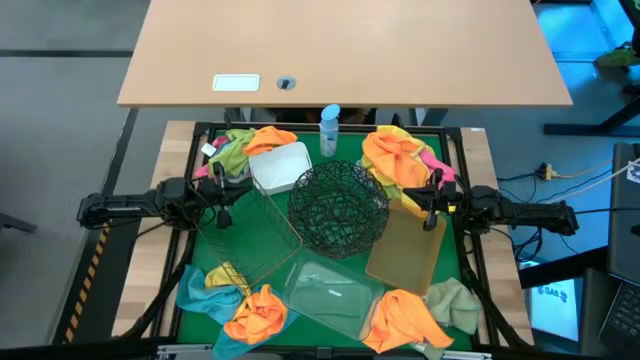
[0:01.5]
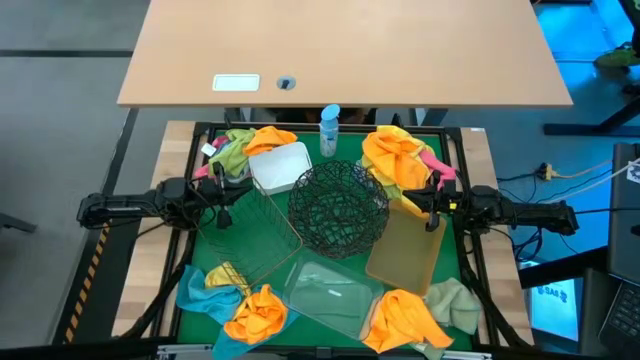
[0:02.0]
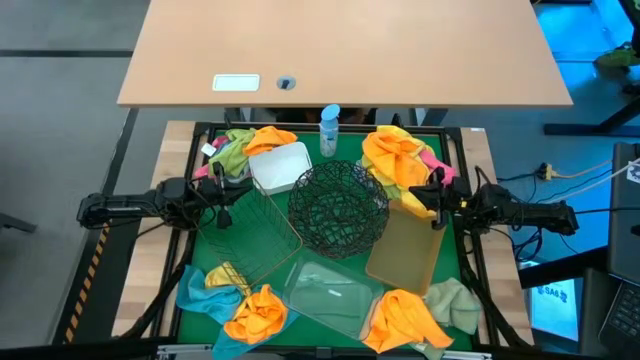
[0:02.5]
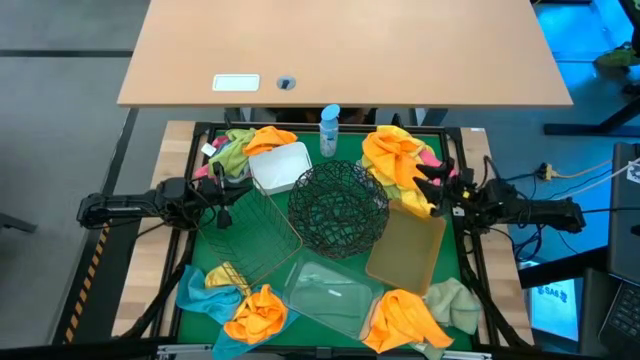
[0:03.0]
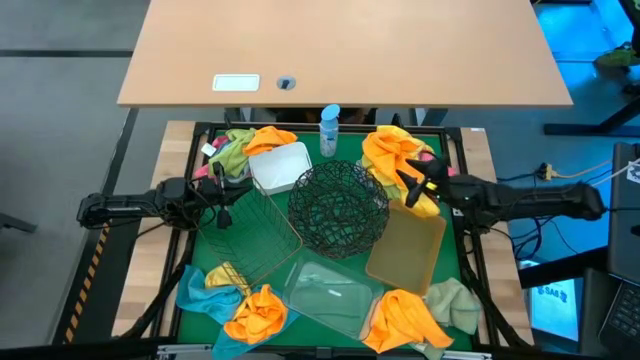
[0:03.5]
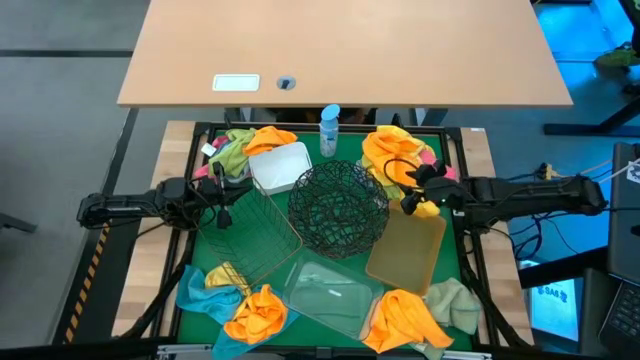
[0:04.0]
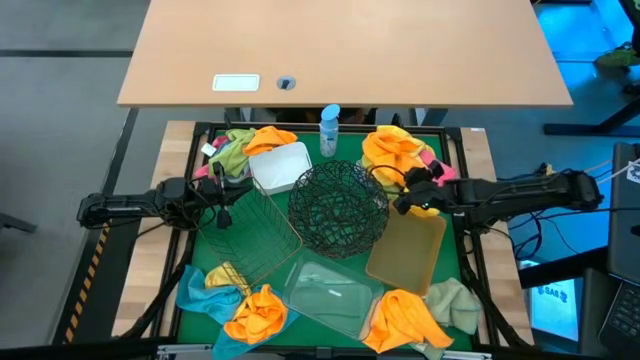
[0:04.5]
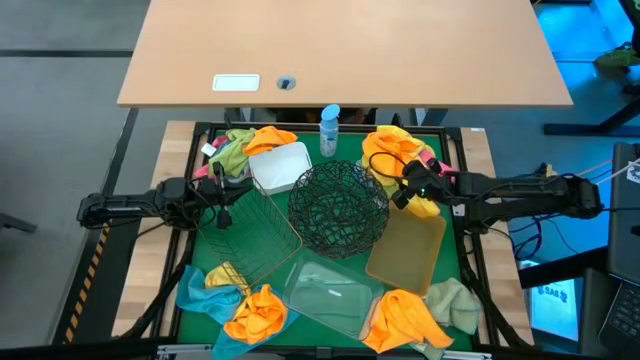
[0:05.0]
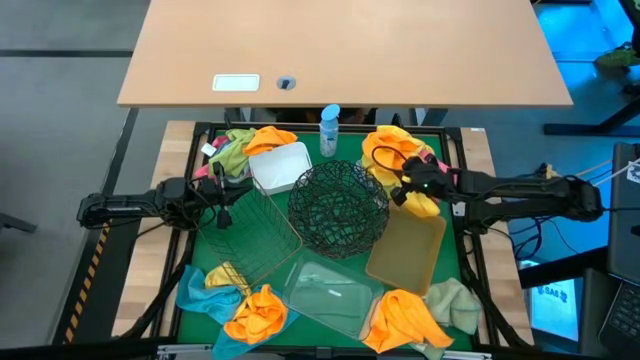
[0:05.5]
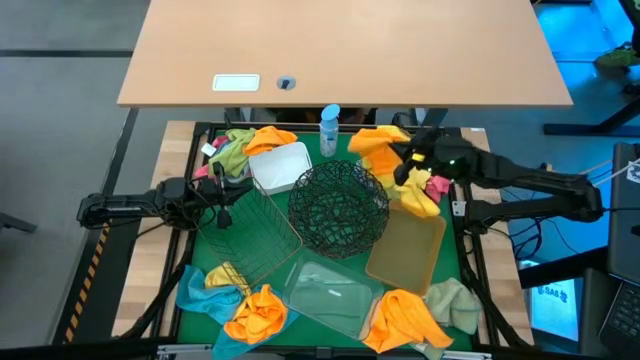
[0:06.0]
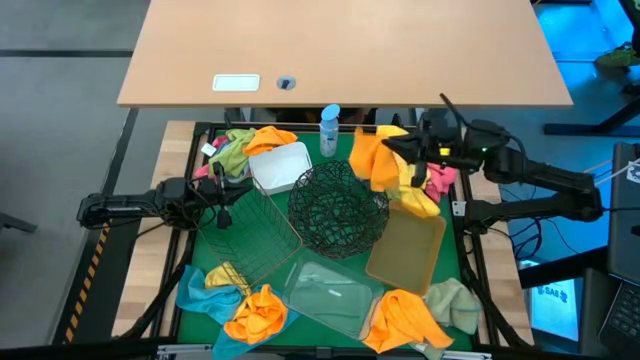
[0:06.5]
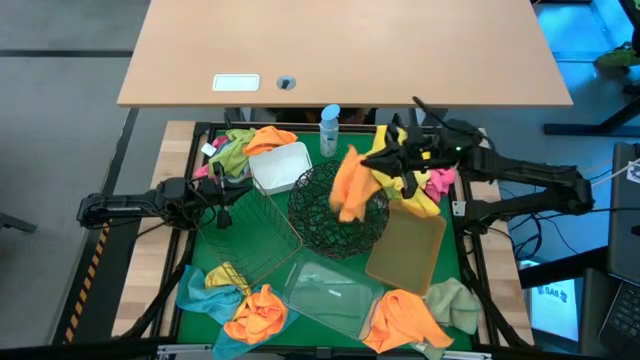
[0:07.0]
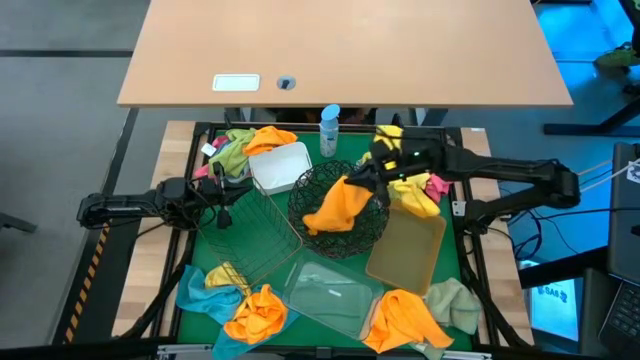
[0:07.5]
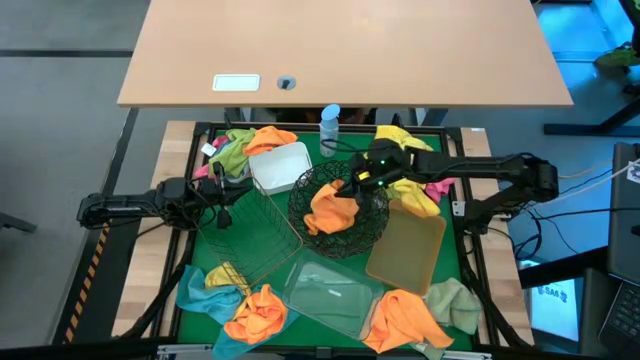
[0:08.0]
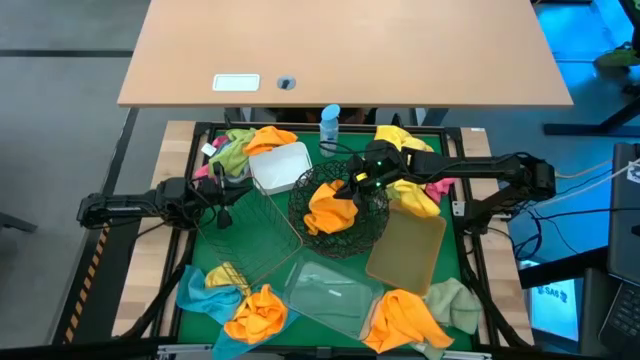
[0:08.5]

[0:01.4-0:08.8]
Task: Sort microfiber towel by color & place in baskets
Put the orange towel into the round wire basket

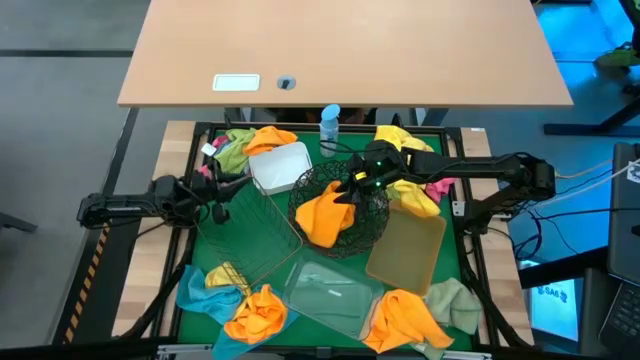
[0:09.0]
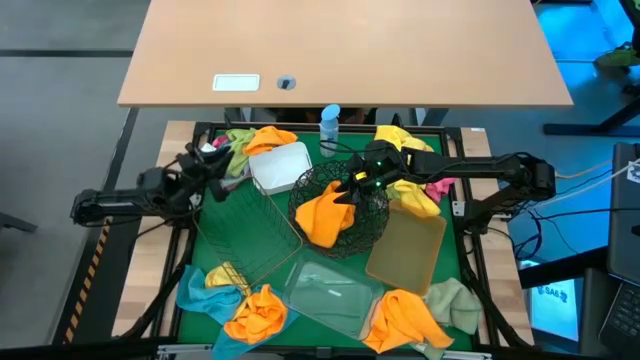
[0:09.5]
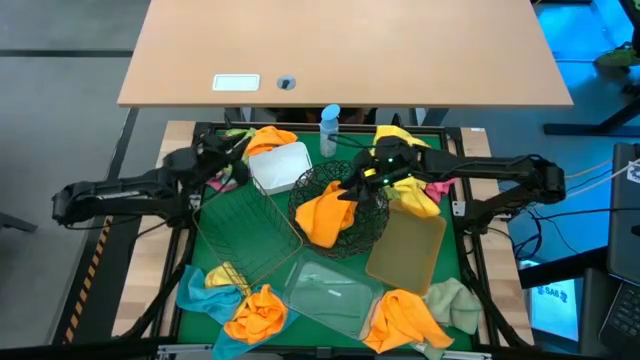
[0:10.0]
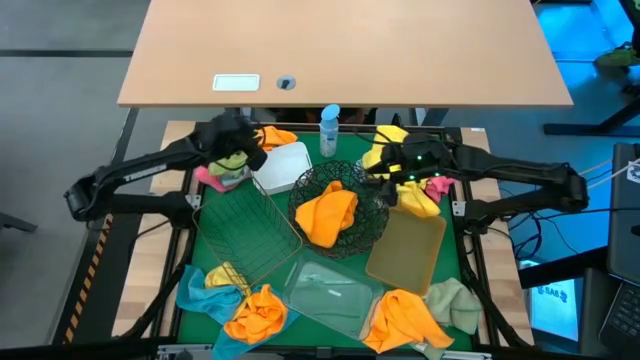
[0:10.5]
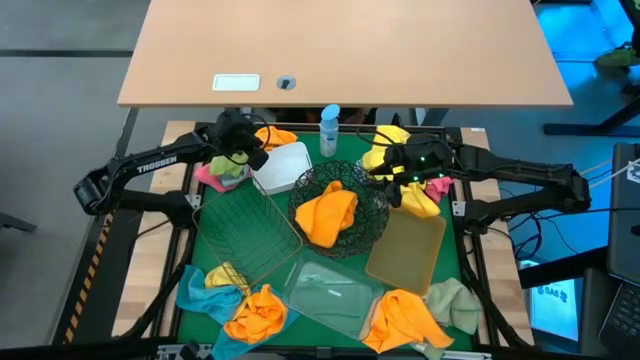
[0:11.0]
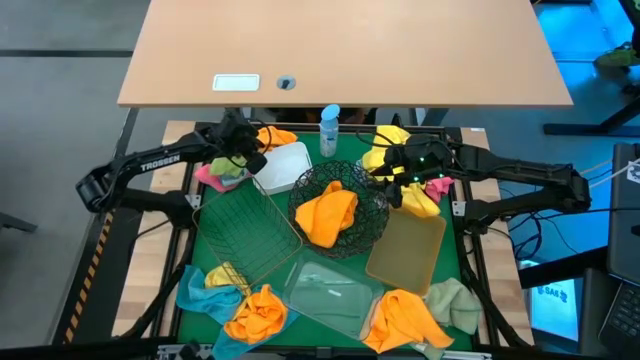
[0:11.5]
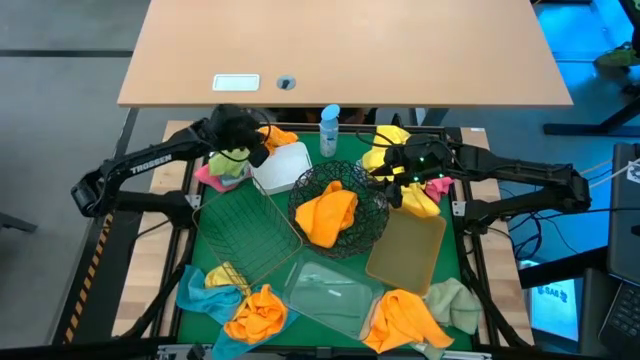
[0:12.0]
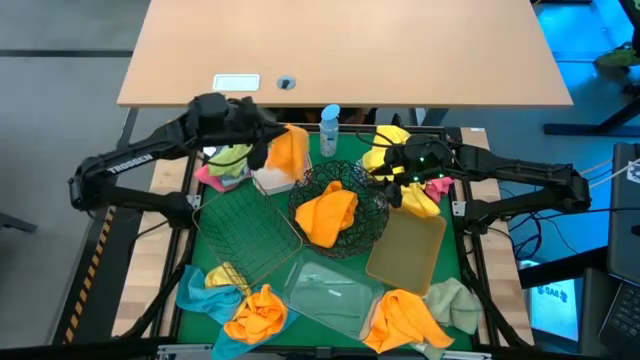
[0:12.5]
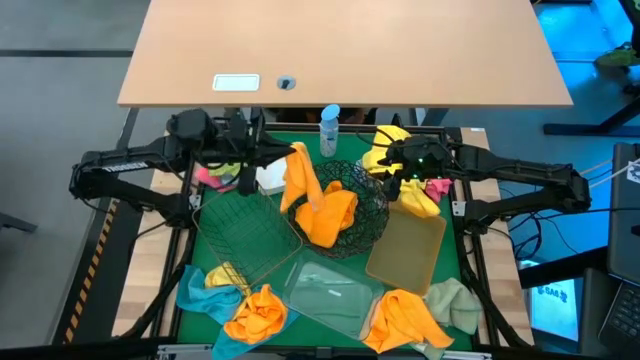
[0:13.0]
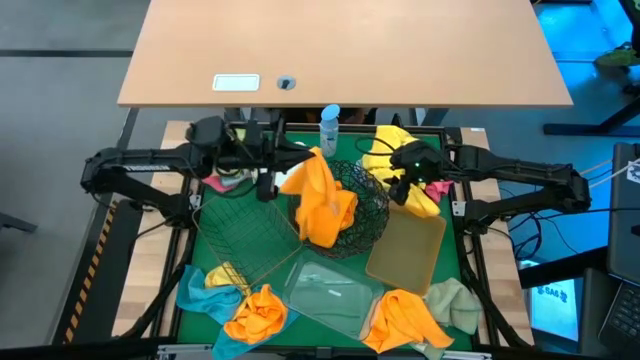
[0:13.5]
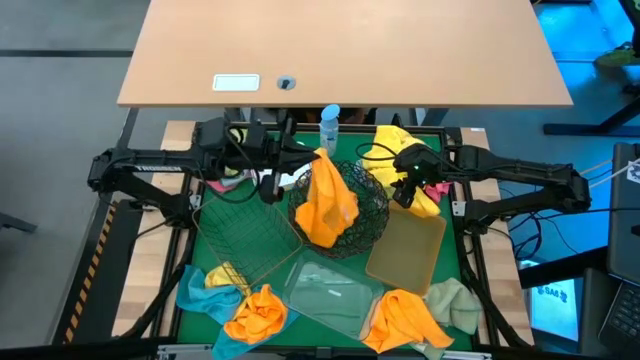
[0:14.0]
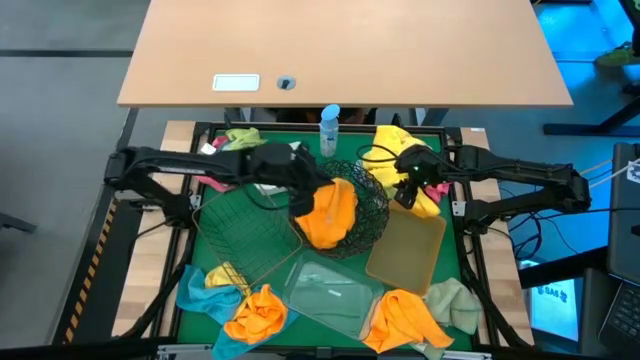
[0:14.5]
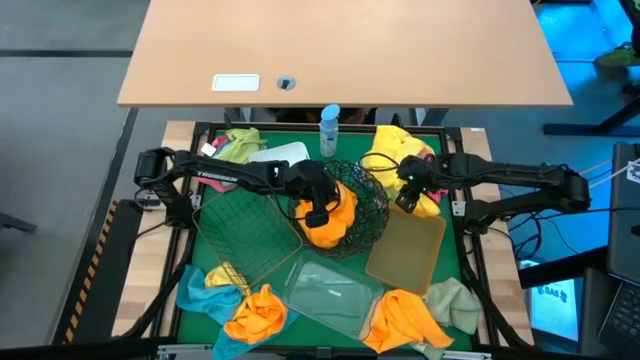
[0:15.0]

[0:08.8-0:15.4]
Put the orange towel into the round wire basket

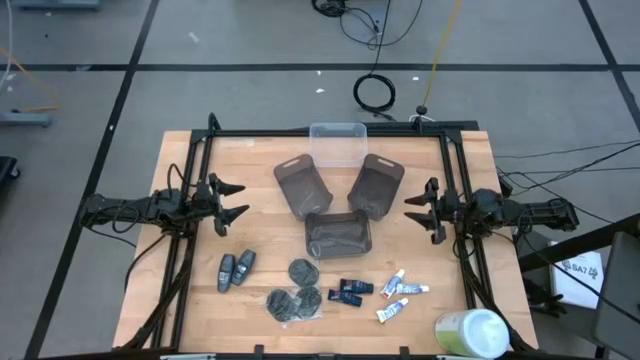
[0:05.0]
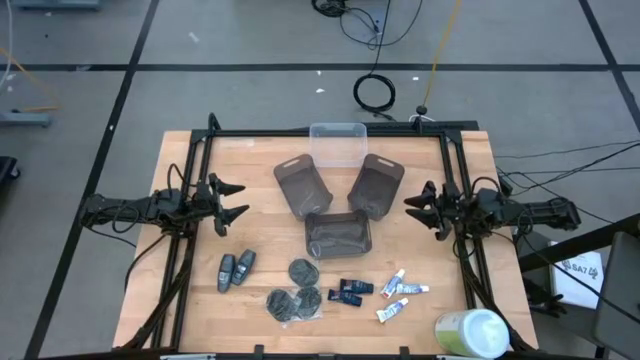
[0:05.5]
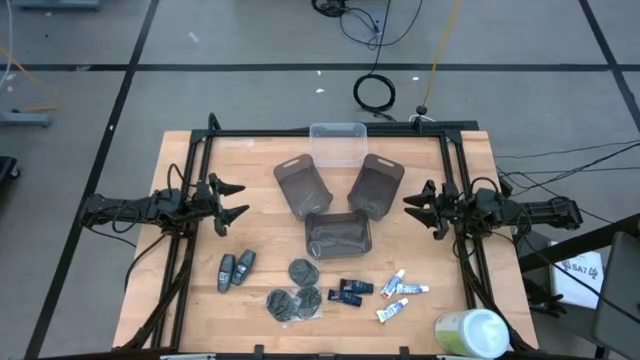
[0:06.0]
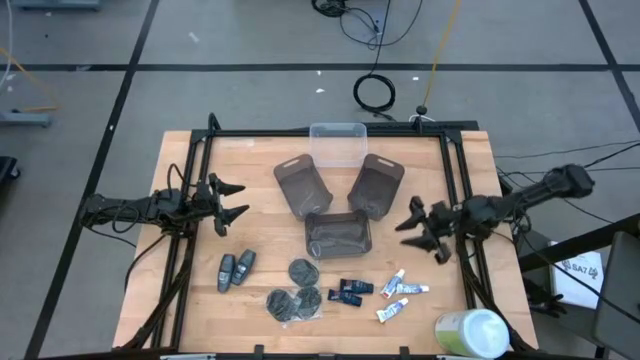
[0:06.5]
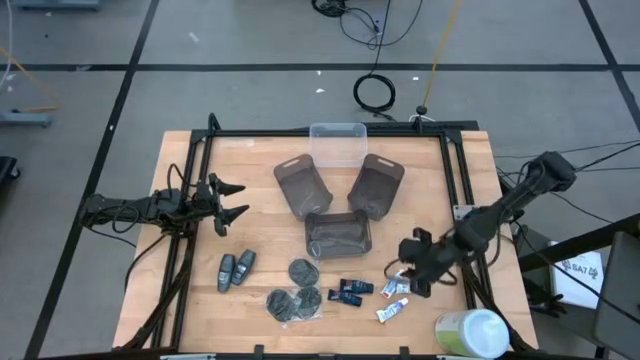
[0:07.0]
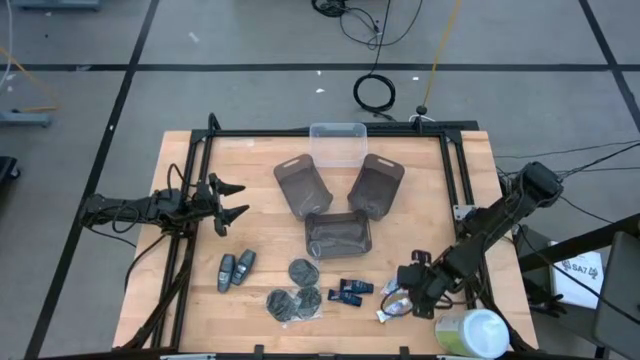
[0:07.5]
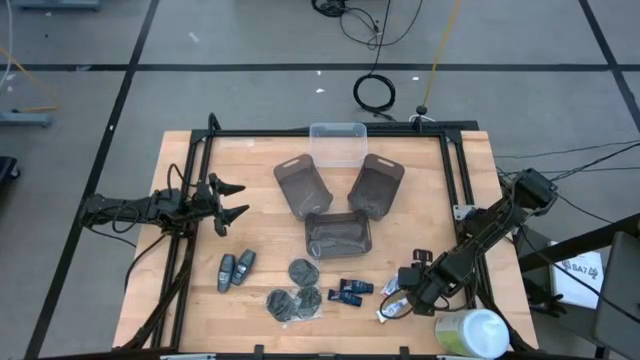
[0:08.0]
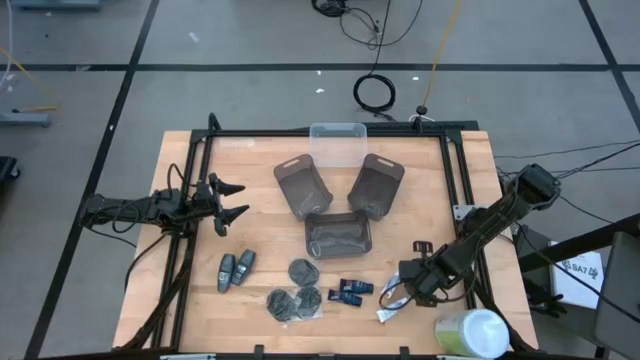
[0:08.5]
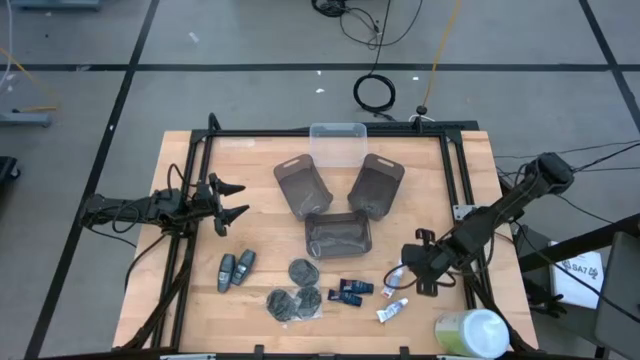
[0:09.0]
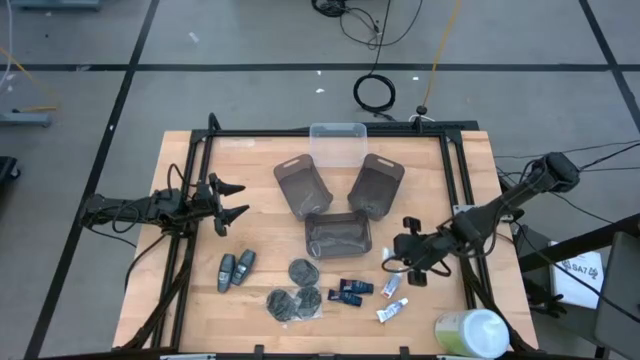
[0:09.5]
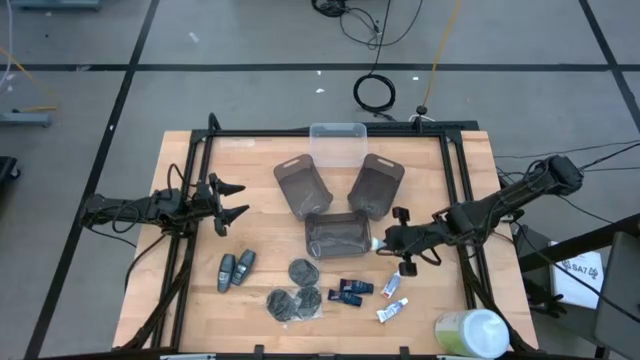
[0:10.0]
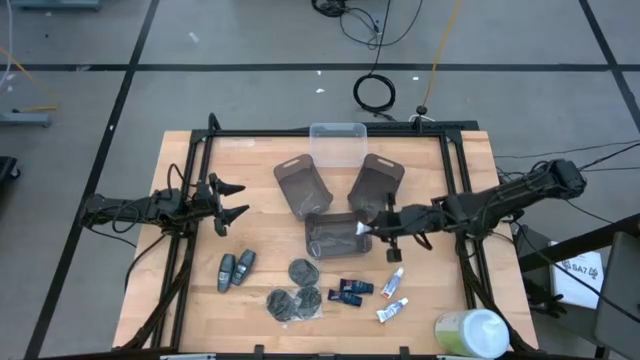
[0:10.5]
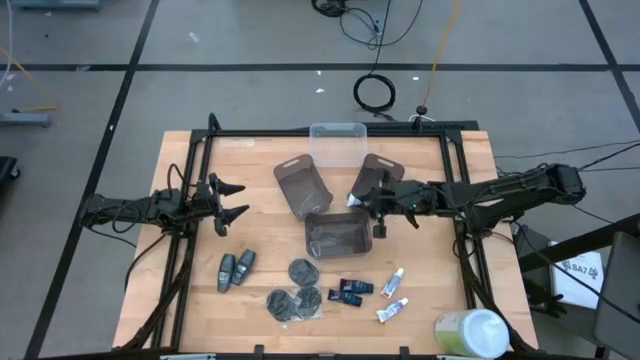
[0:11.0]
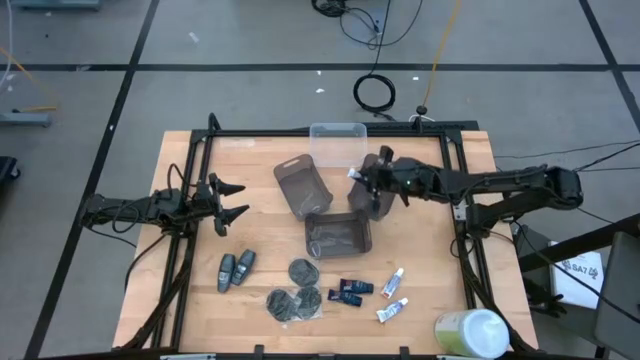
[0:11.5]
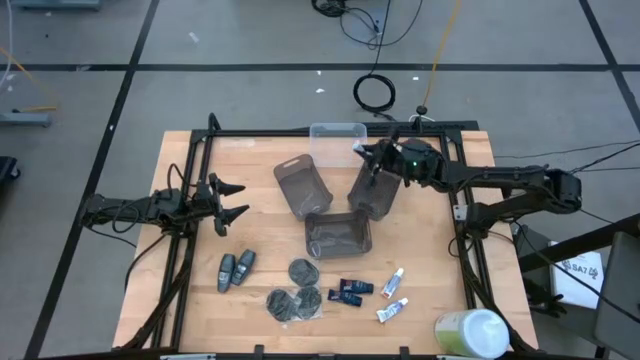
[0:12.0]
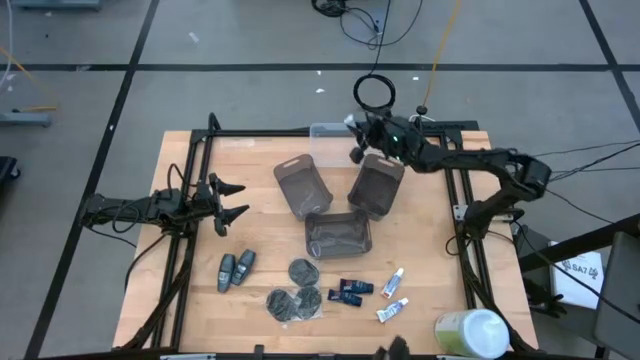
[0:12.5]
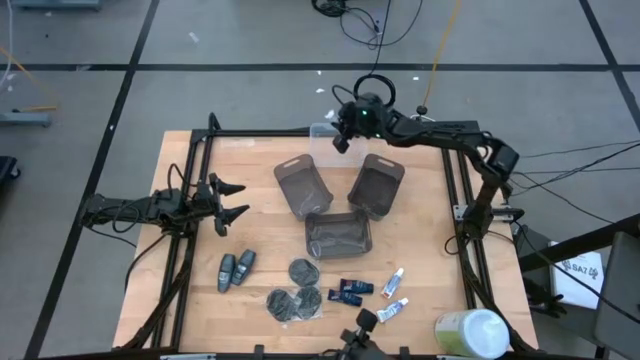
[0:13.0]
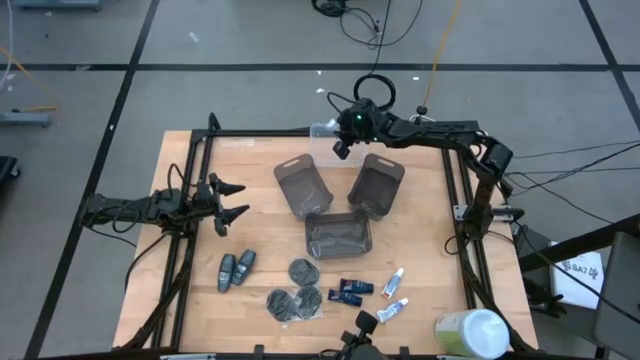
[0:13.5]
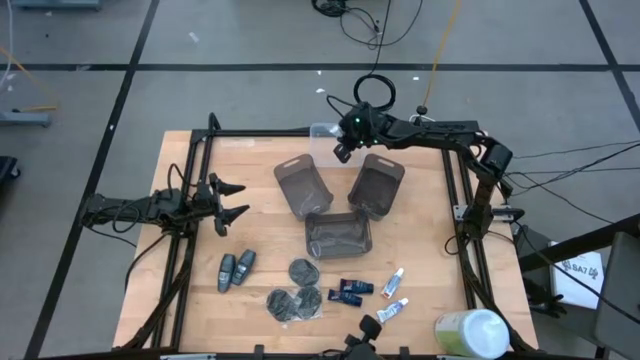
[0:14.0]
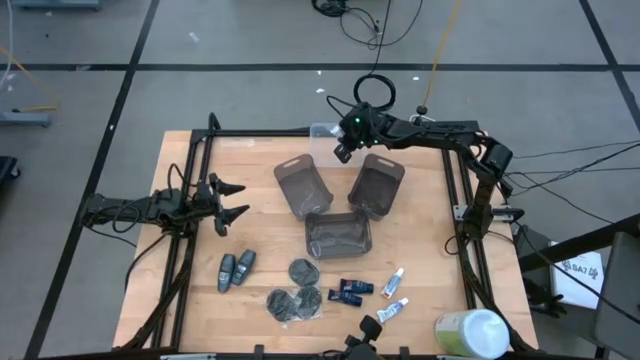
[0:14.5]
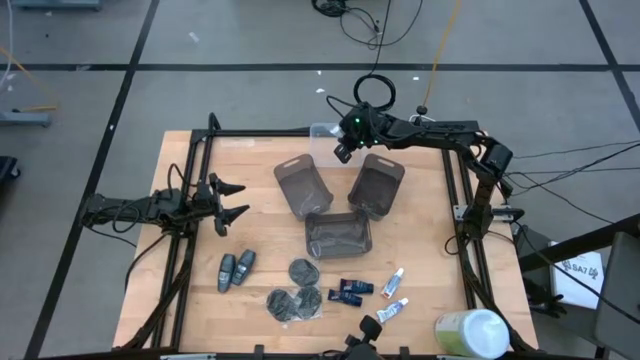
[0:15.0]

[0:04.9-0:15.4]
Task: Pick & Place Travel size toiletries
Put the middle right white toothpaste tube into the white transparent bin
